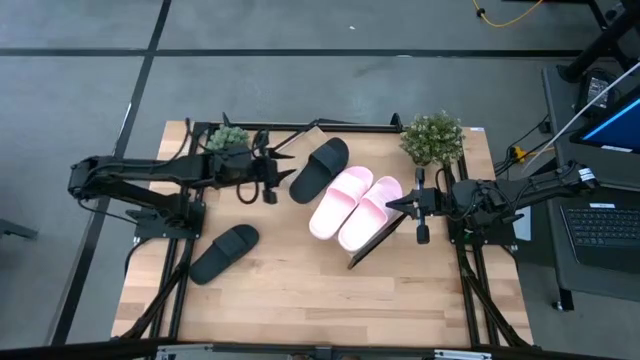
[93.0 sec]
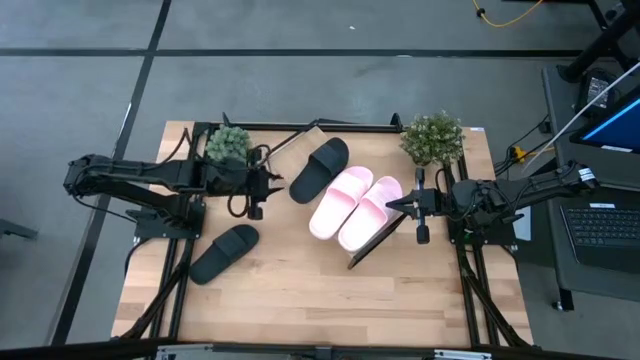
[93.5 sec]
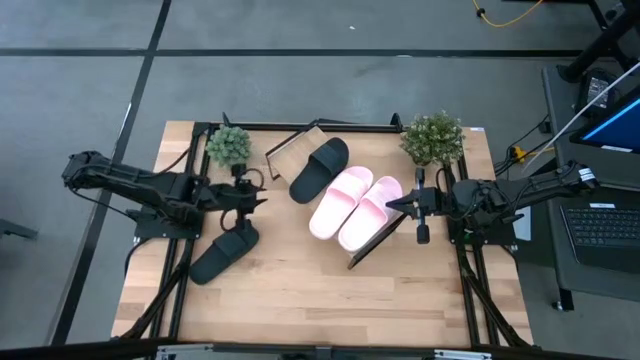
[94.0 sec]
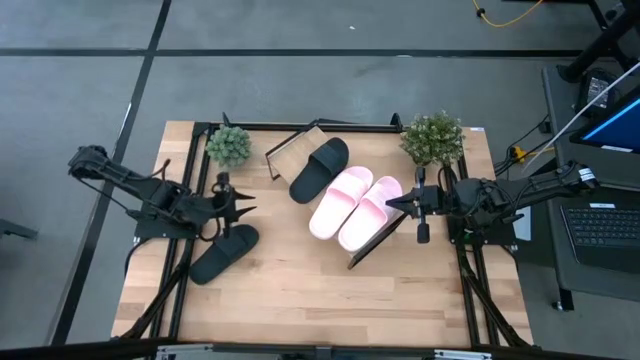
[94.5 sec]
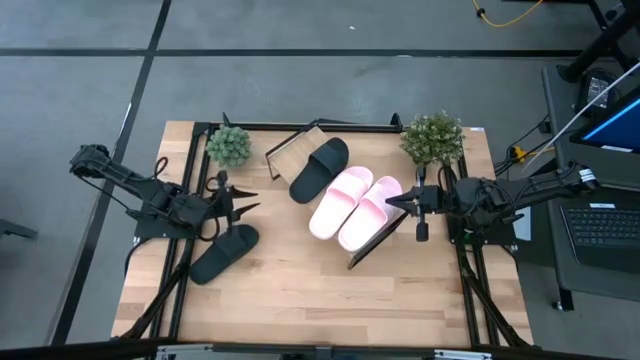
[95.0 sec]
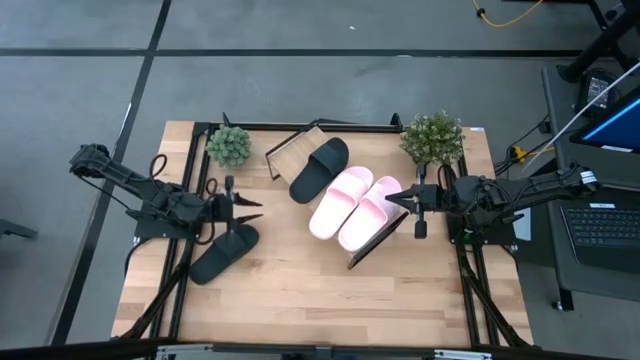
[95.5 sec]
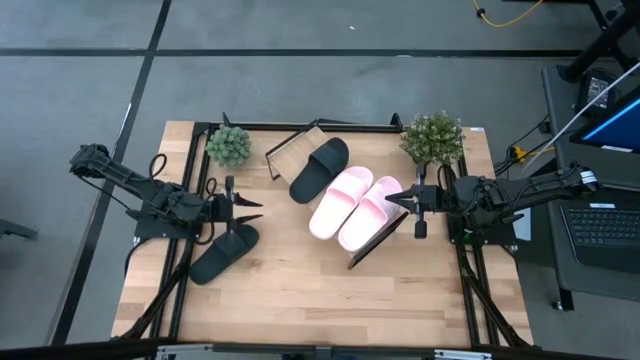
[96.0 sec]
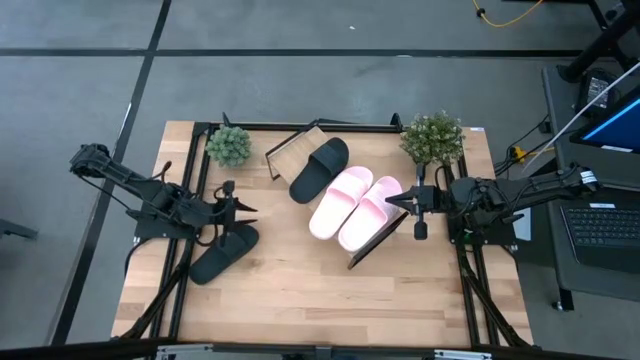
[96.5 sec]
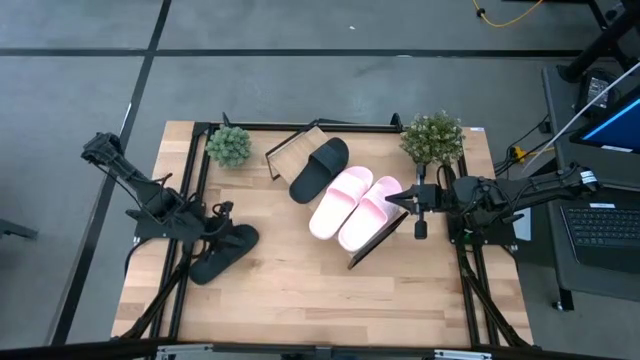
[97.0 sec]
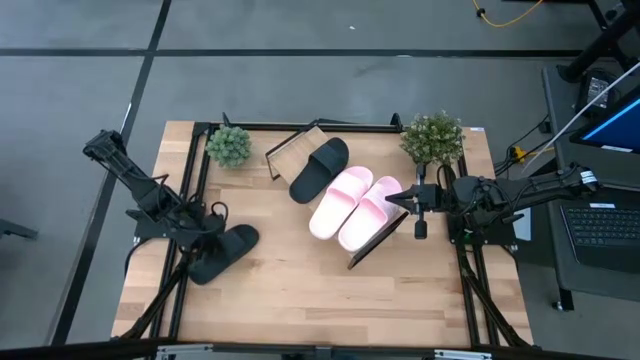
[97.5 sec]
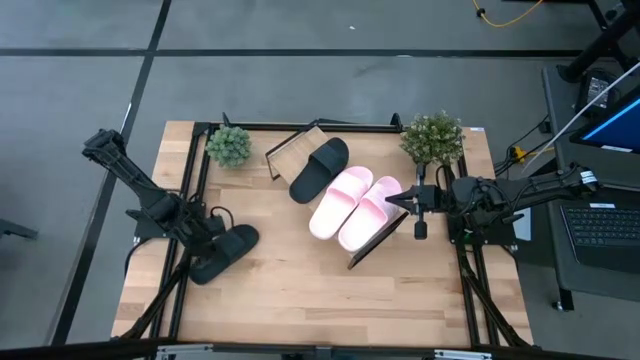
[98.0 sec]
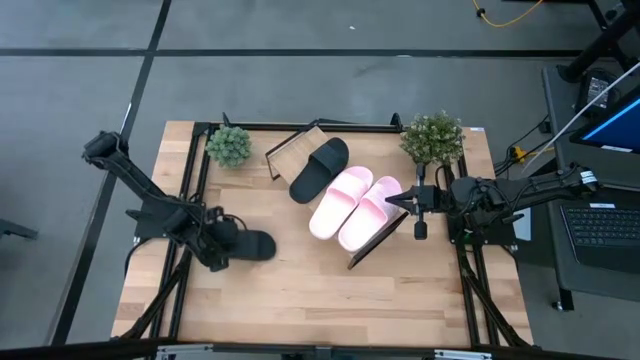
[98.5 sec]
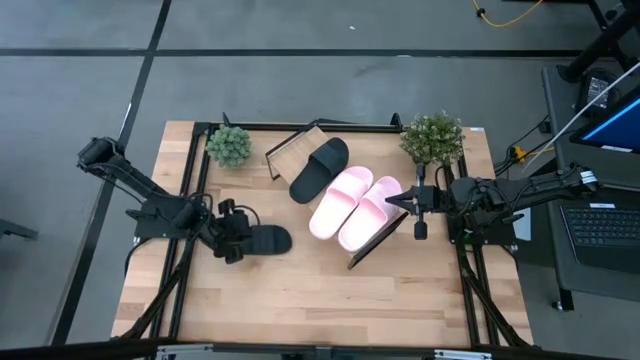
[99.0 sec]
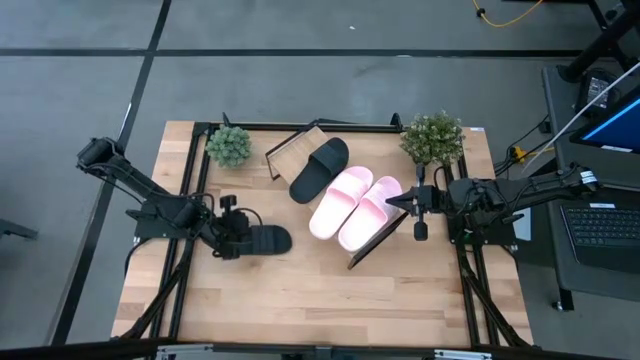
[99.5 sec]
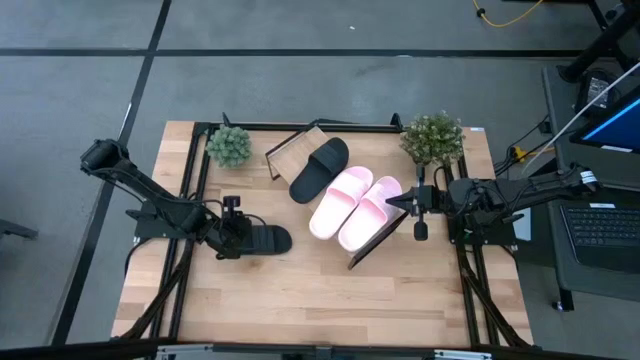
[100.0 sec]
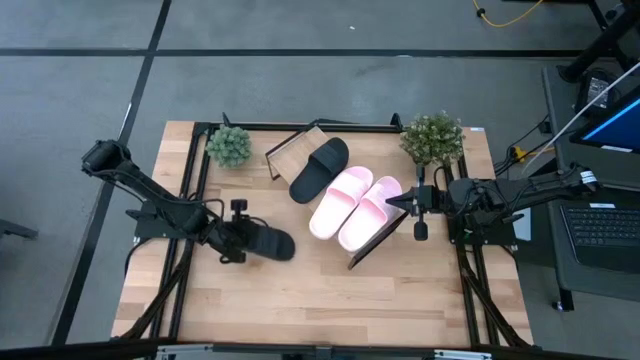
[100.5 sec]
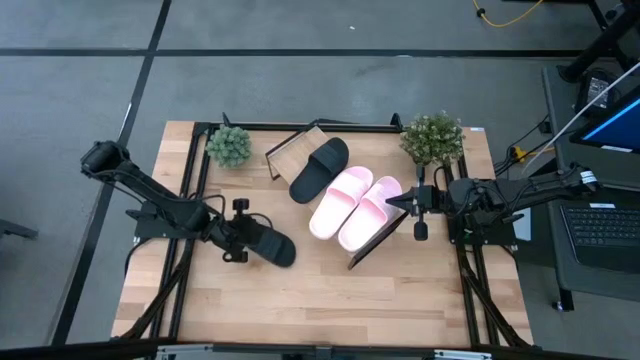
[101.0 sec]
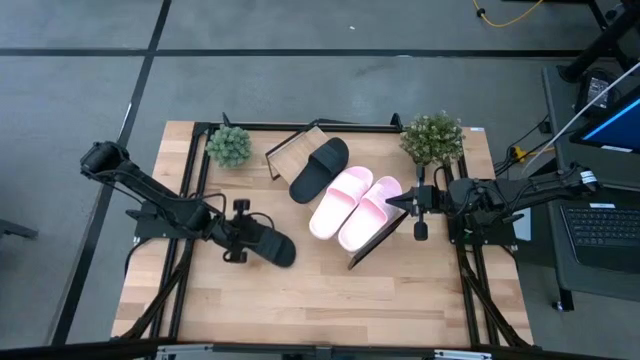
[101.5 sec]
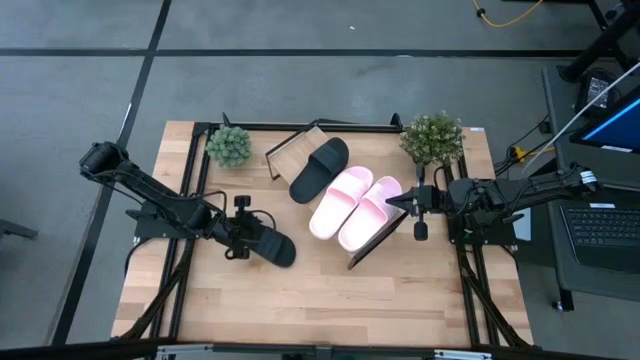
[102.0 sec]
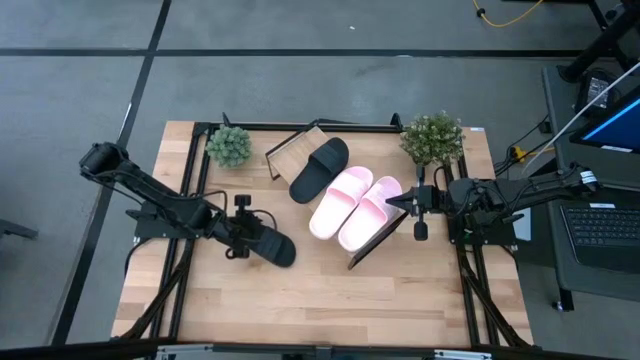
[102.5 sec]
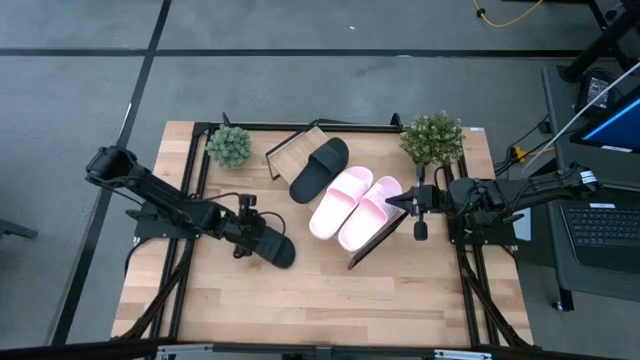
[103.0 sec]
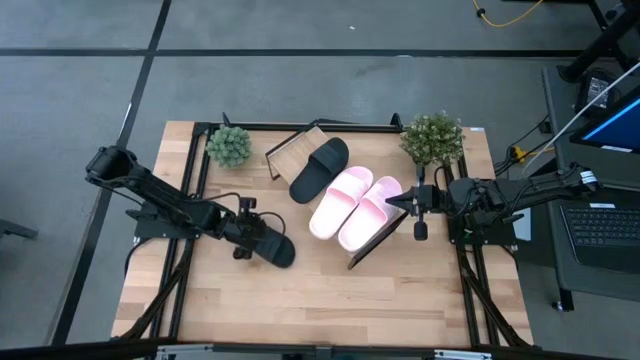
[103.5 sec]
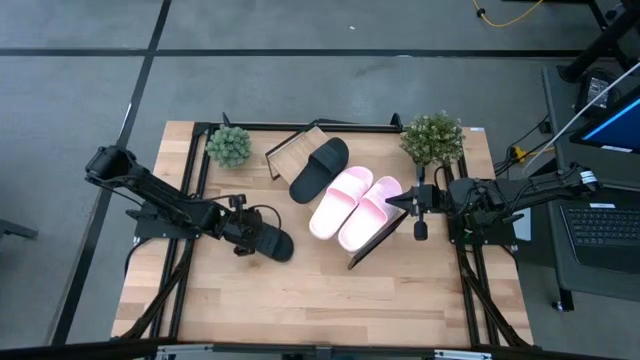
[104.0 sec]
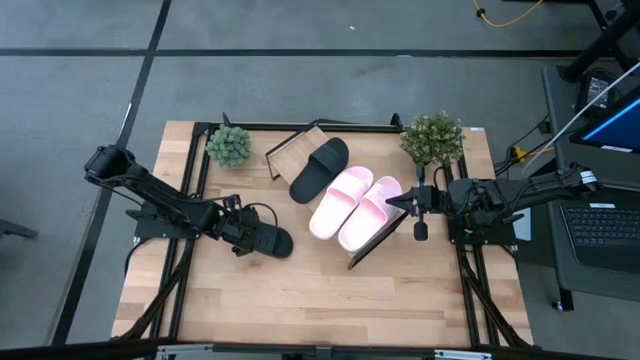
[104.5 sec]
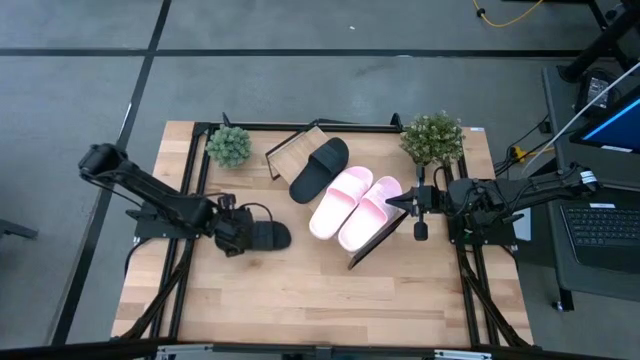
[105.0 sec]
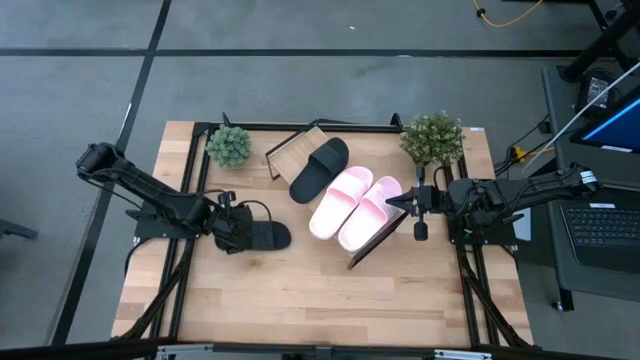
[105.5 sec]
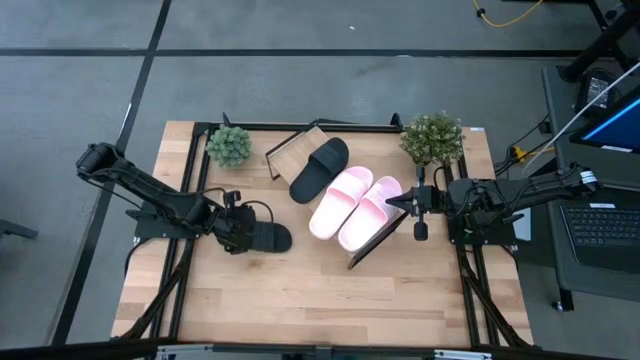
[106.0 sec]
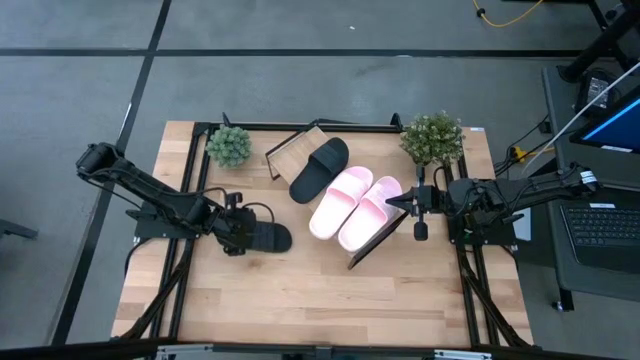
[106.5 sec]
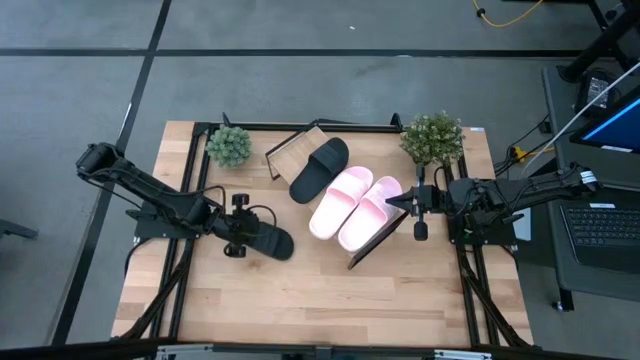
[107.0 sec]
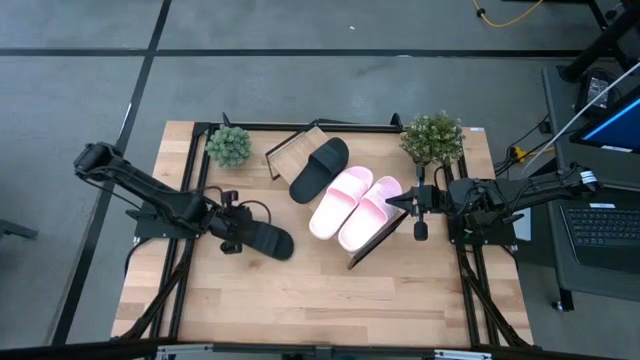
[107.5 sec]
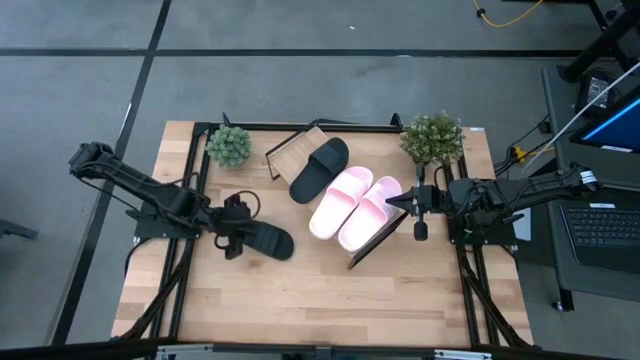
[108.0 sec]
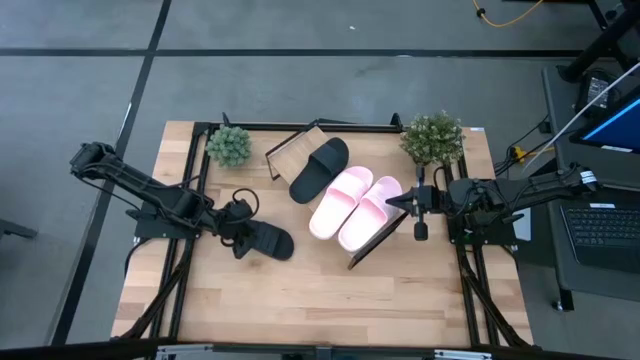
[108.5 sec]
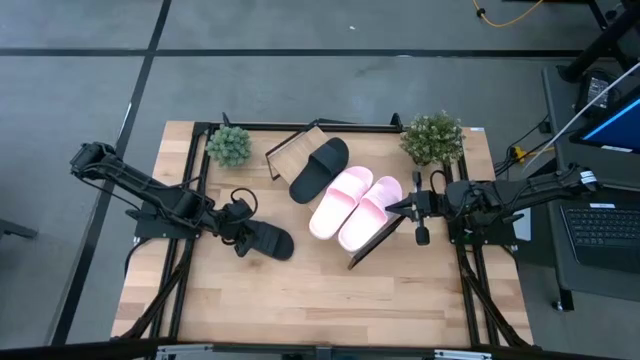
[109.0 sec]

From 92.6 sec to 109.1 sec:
Task: Pick and place slides into the shelf
Put the black slipper on the shelf

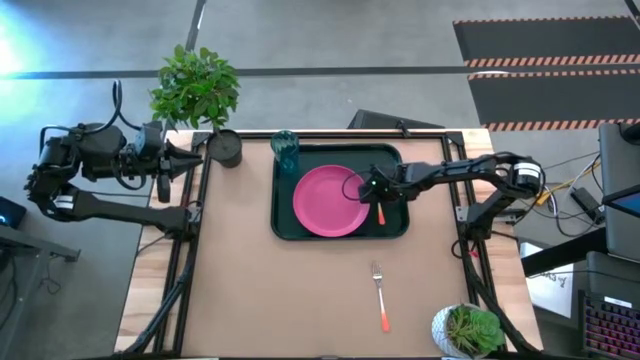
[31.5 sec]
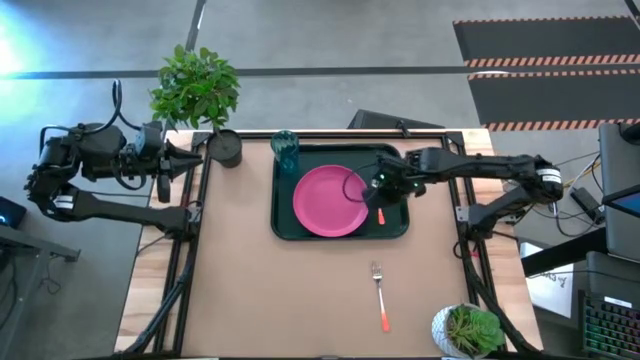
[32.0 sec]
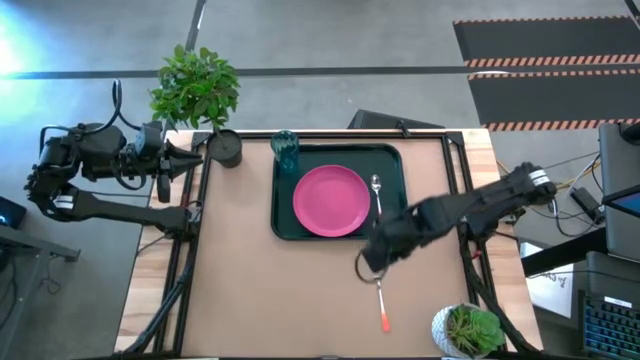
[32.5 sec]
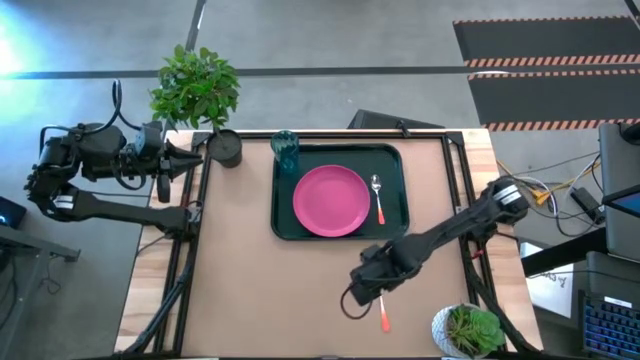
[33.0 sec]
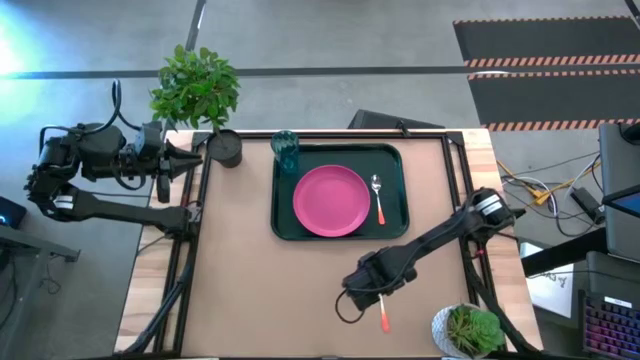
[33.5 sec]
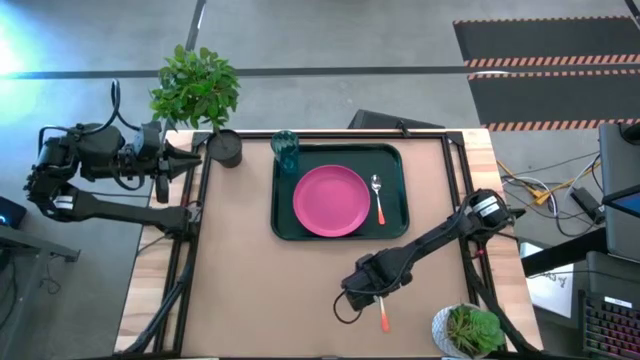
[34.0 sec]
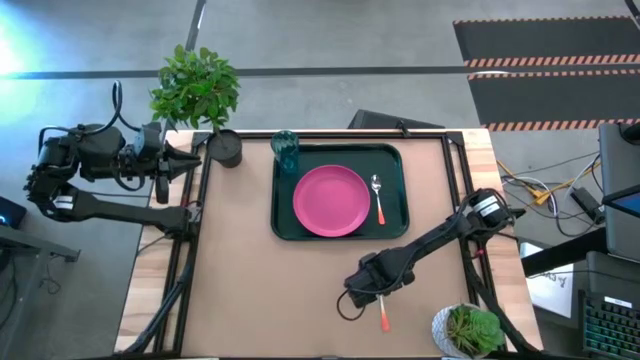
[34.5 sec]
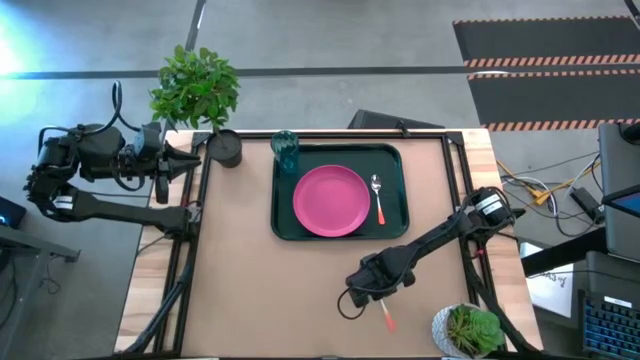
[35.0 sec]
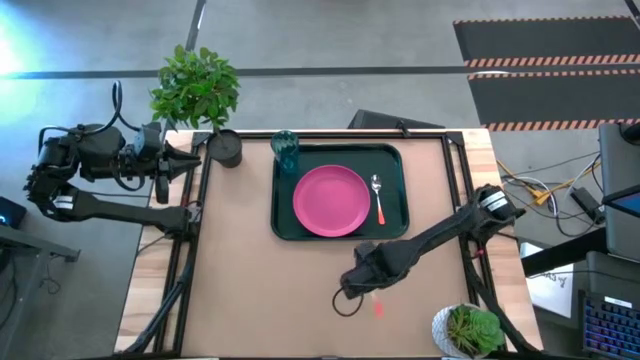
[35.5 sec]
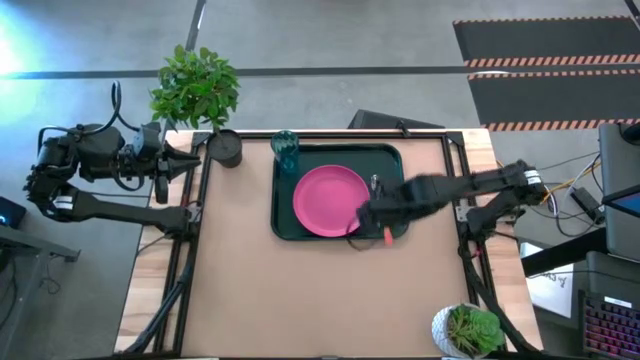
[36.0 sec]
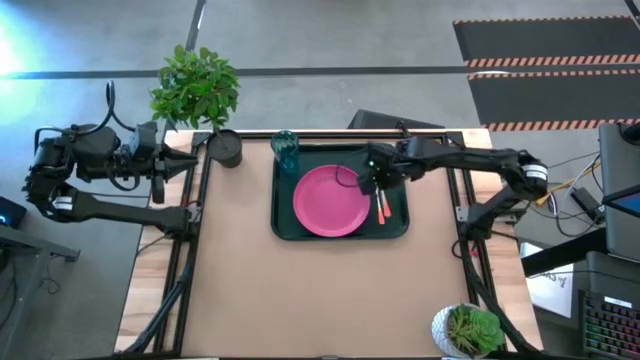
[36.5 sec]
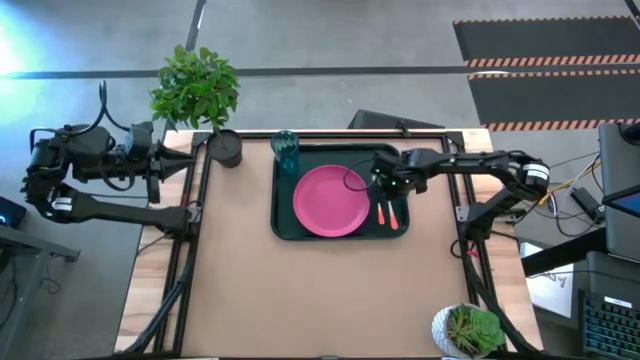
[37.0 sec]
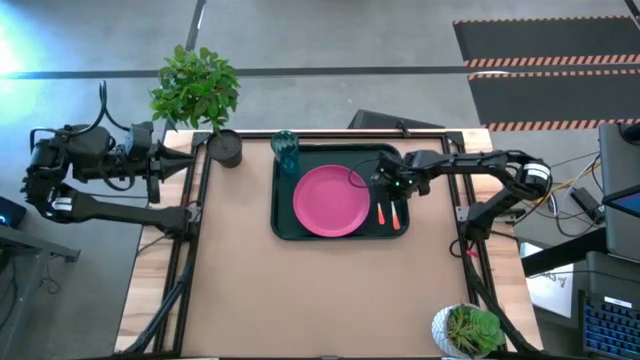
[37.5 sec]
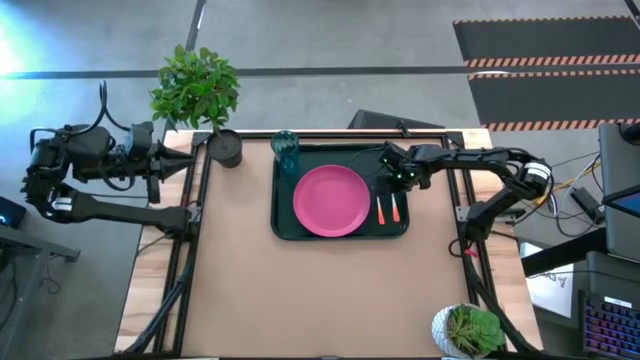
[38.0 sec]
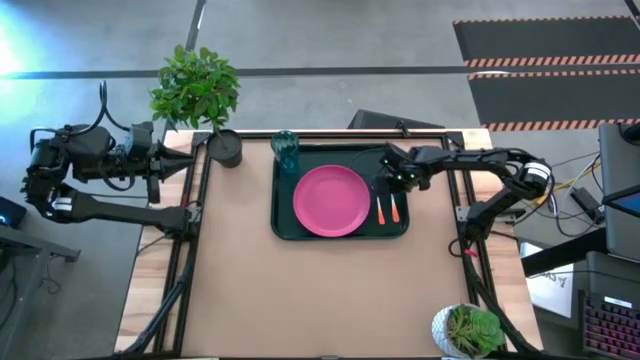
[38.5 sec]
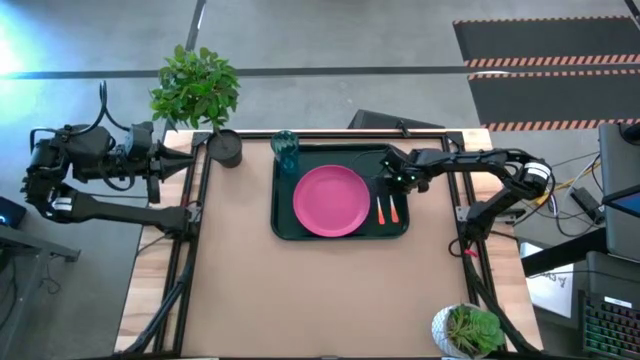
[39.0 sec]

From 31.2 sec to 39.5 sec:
Task: Pick and place plate/cup/fork/spoon on tray
Put the orange fork on the black tray to the right of the orange spoon
